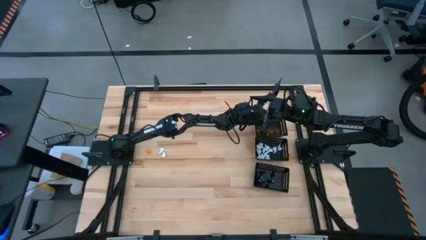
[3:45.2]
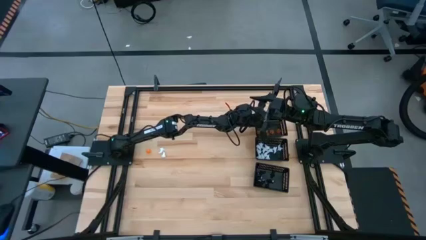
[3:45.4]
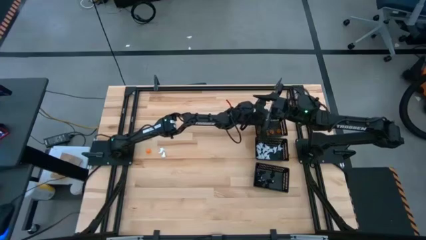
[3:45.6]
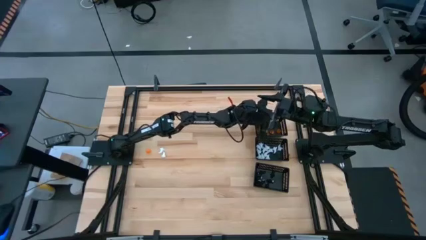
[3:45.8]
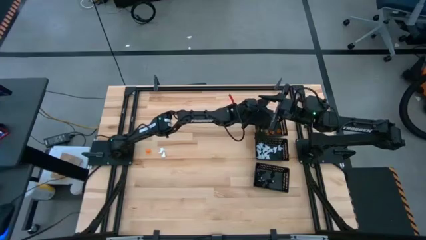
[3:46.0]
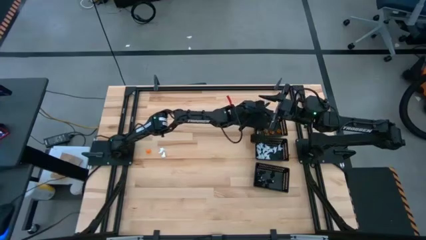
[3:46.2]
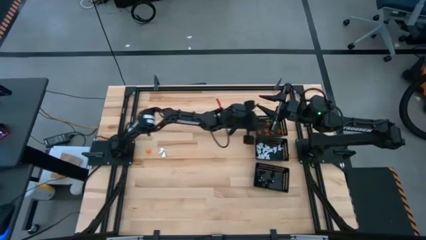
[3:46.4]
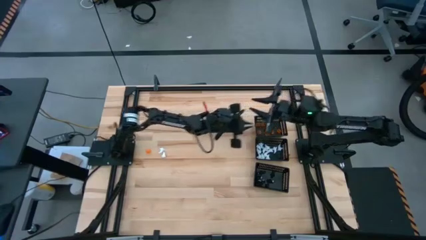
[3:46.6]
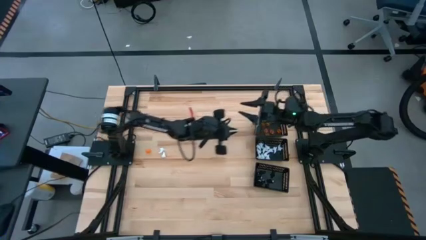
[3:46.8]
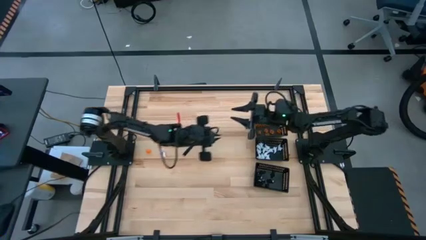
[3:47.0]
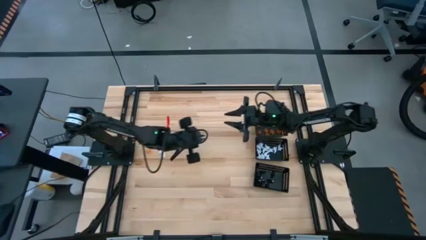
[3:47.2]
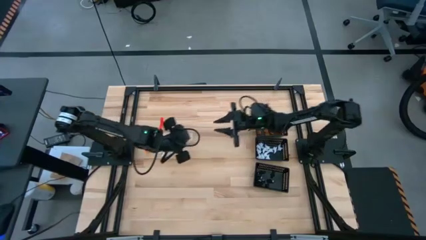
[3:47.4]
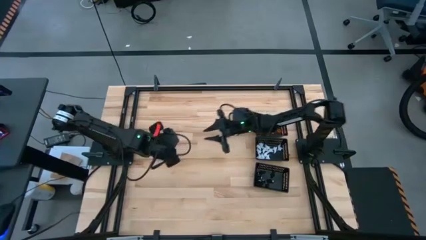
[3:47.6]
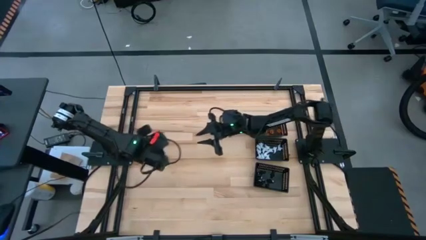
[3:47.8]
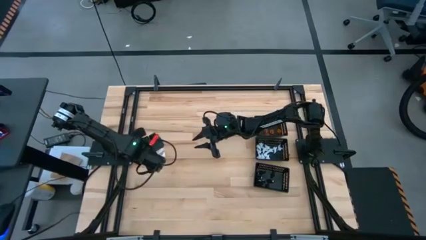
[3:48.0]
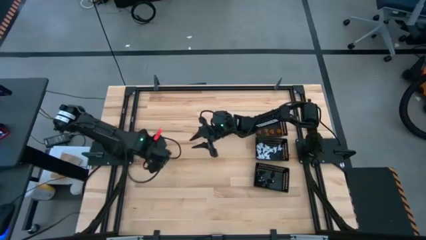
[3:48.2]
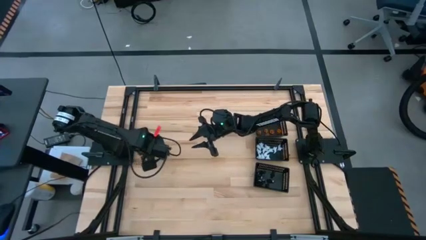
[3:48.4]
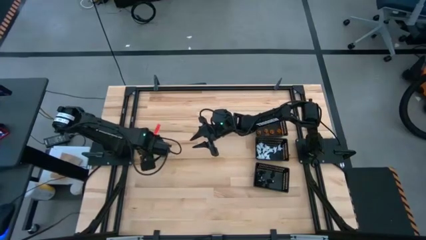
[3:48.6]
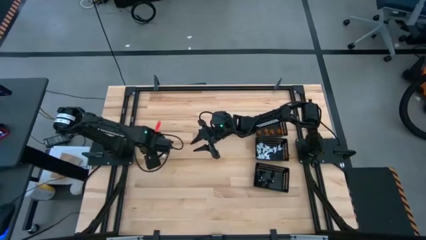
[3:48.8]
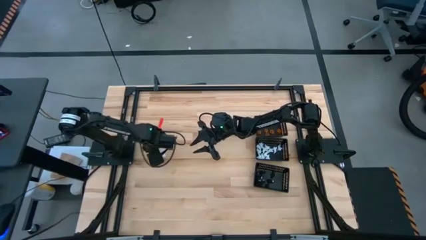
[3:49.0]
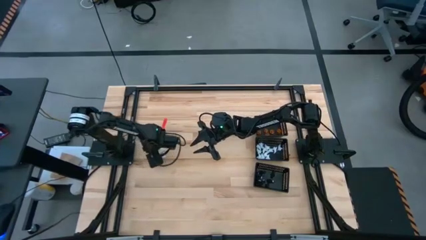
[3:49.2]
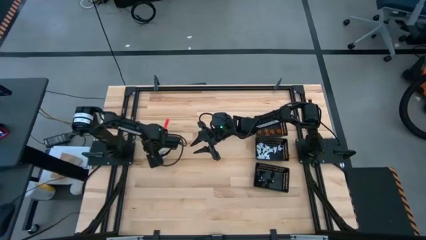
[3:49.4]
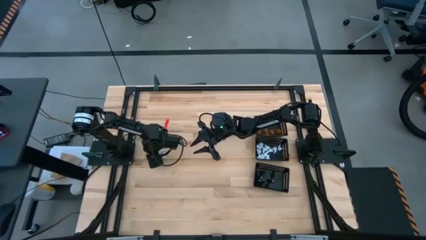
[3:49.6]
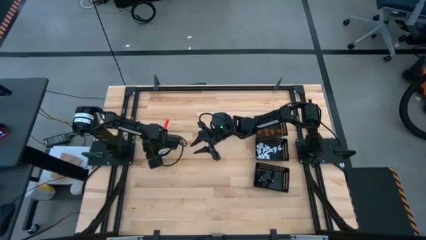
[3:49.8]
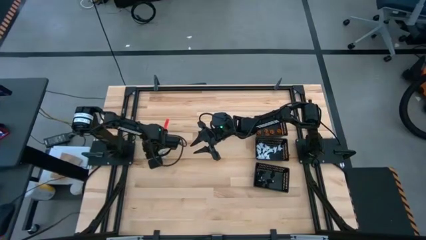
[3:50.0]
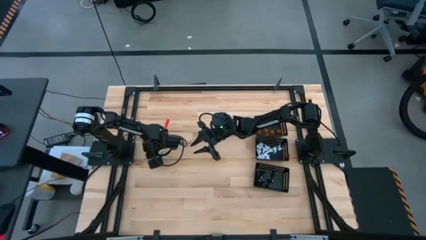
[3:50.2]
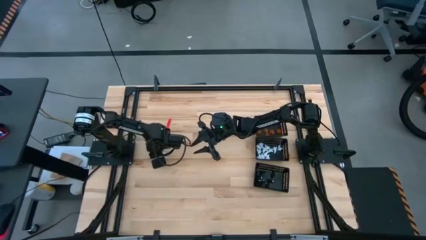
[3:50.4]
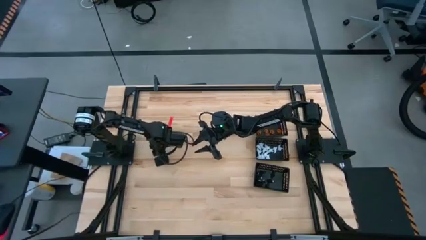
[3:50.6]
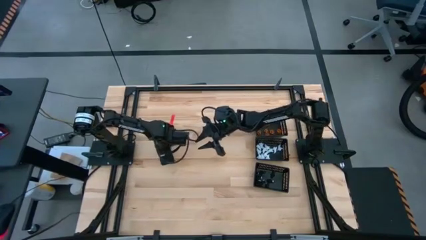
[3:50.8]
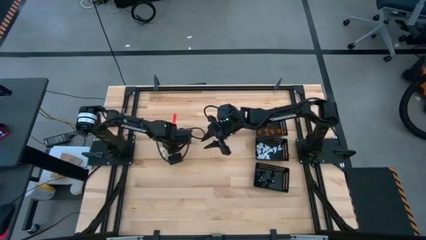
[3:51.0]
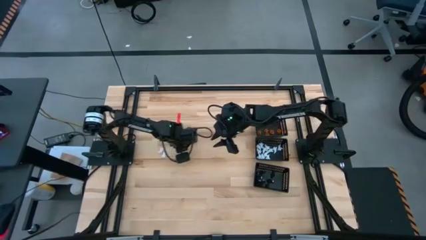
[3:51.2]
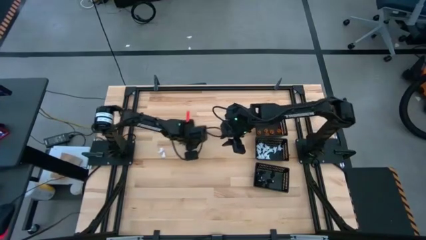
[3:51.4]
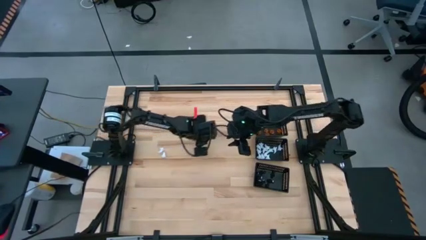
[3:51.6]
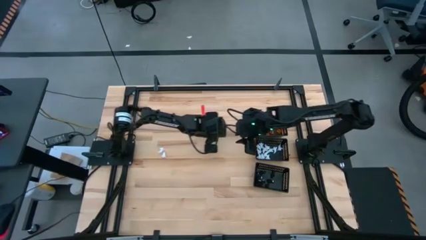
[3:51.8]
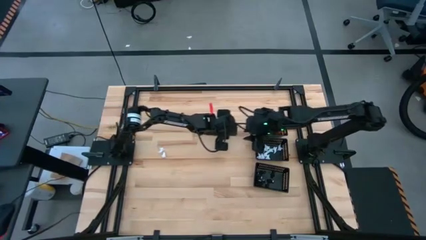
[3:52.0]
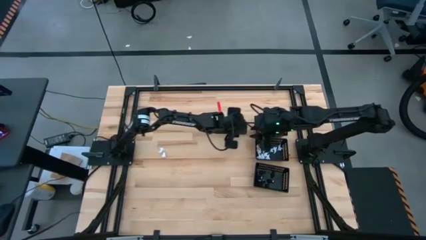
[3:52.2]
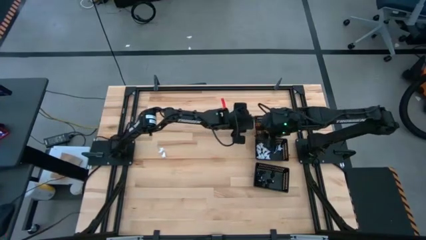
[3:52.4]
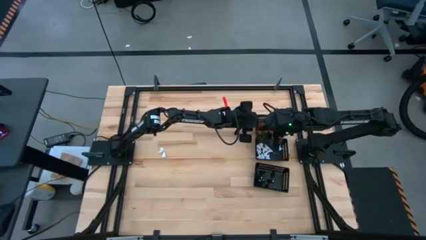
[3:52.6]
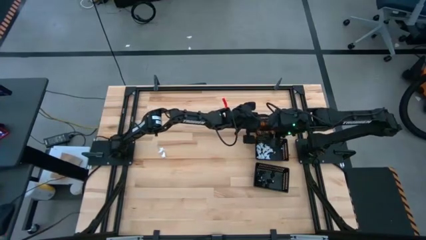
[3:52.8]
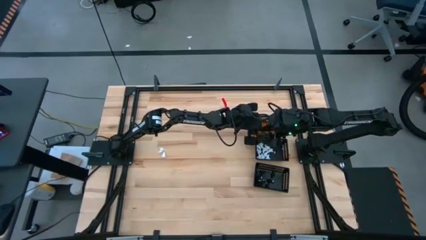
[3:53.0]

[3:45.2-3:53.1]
Task: Sort Halloween decoration
Put the orange pumpkin toy into the top black bin

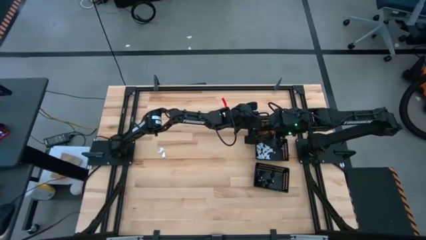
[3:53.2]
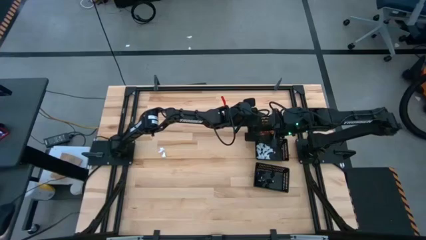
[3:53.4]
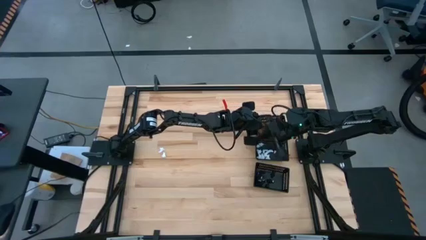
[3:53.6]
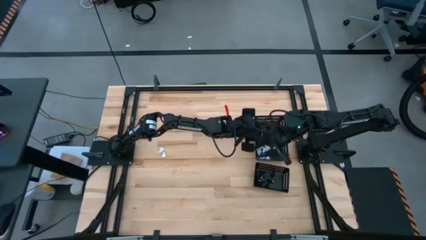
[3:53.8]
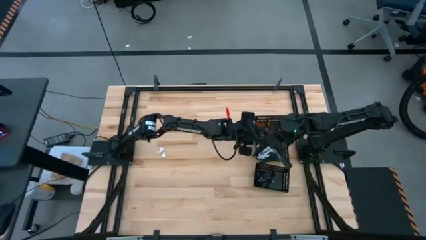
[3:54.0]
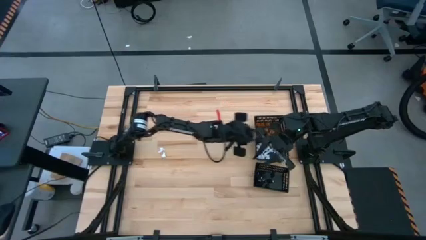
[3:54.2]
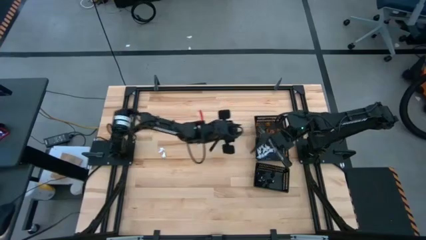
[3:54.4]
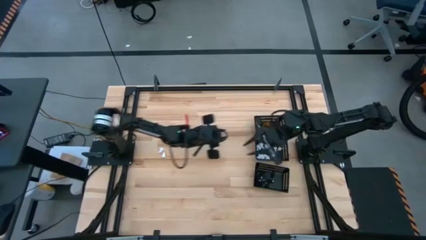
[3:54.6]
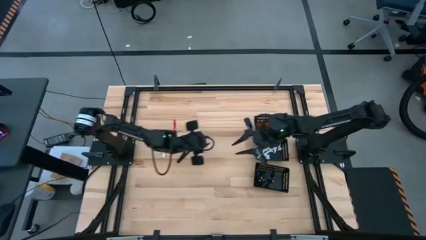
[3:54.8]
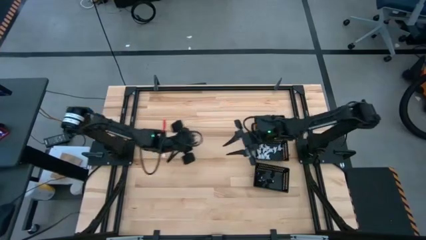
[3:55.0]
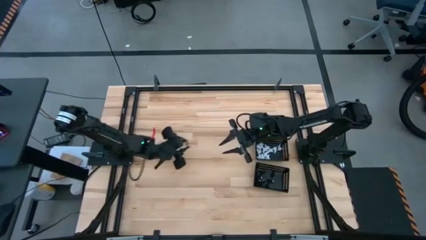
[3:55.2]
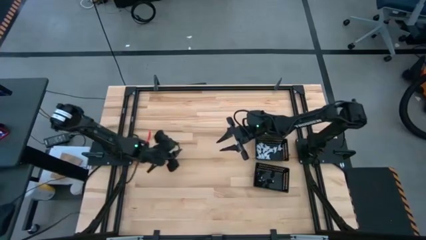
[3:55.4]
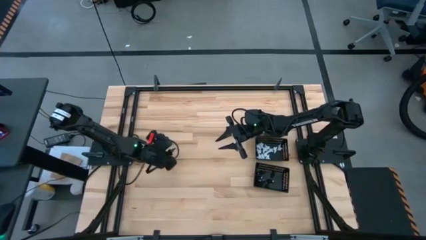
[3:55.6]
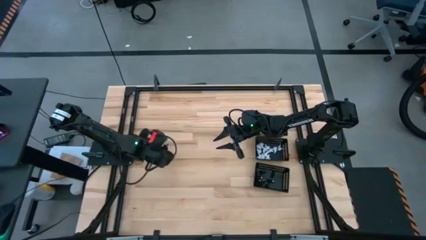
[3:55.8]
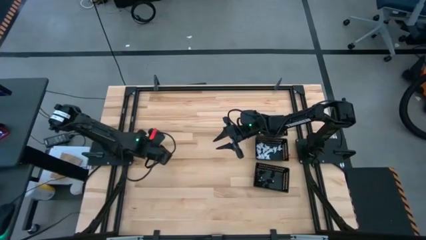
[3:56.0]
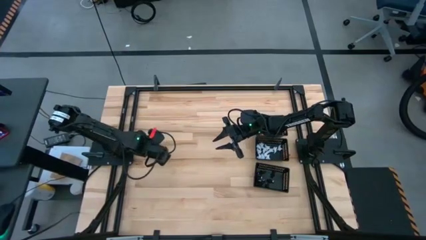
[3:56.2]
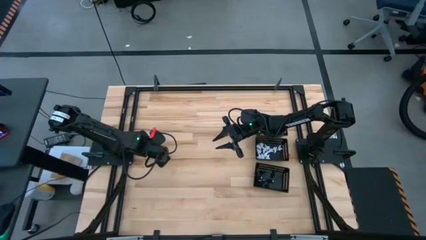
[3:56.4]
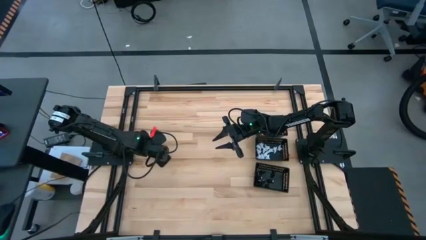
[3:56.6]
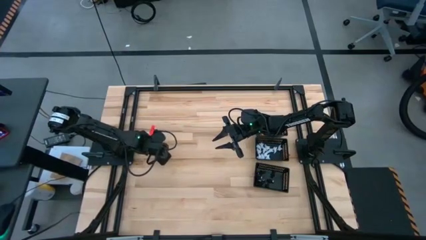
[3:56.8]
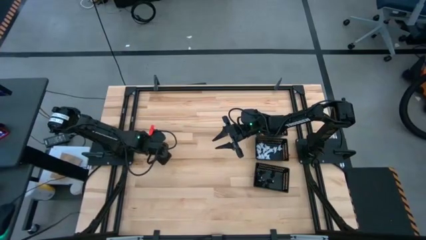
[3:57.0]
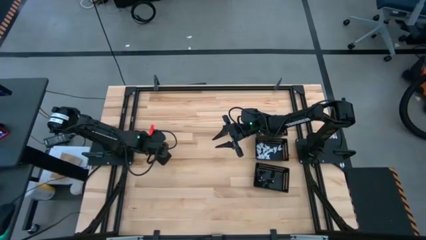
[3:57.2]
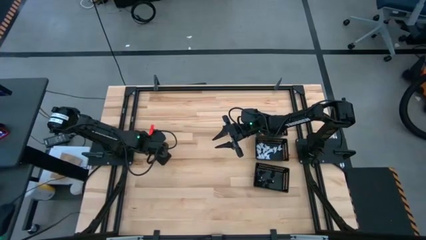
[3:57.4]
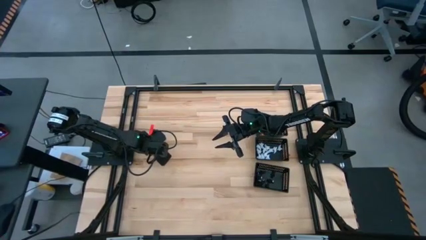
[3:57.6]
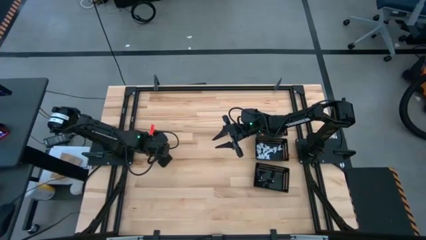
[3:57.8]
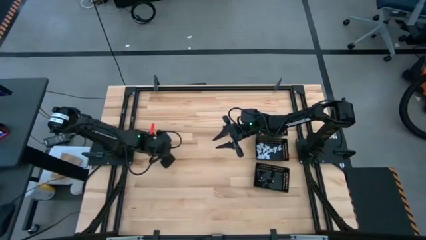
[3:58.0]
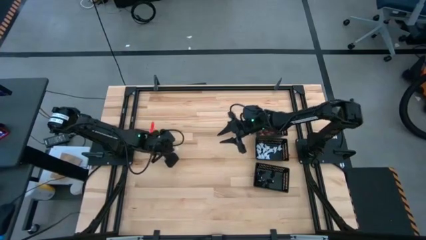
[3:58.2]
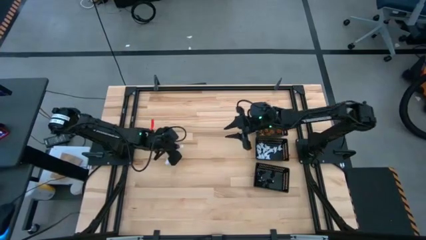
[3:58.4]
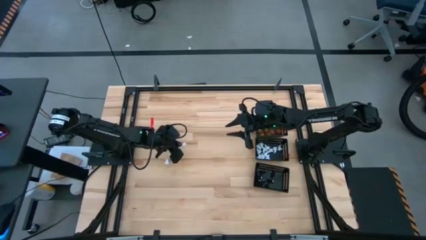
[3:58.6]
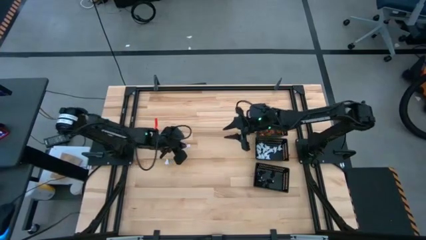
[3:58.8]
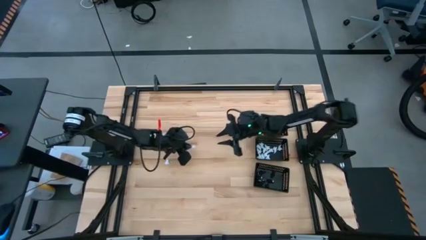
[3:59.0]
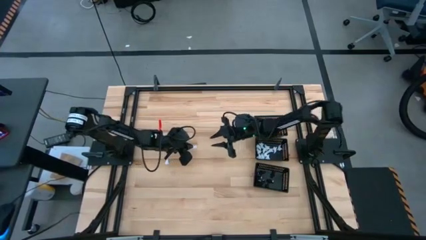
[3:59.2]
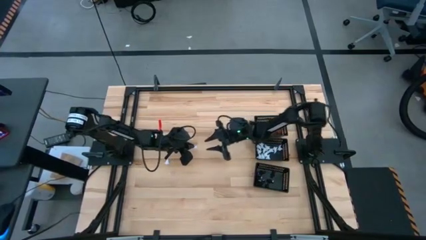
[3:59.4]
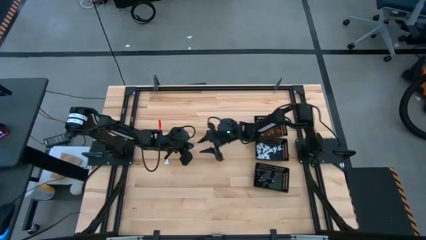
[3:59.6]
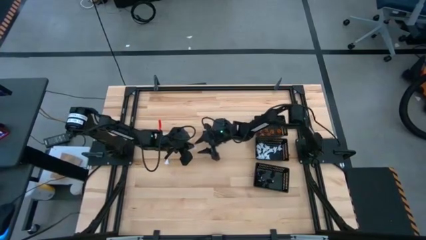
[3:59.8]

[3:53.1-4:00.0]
Put the white ghost toy into the center bin

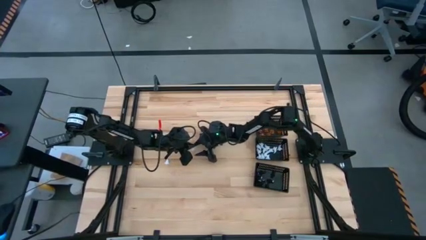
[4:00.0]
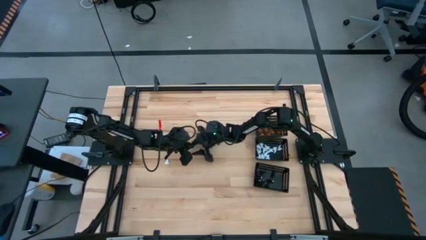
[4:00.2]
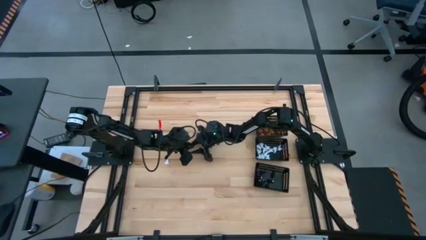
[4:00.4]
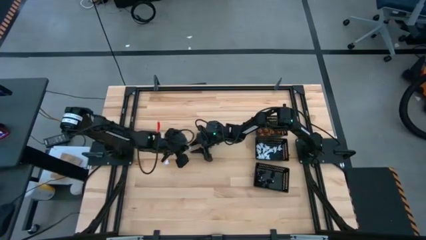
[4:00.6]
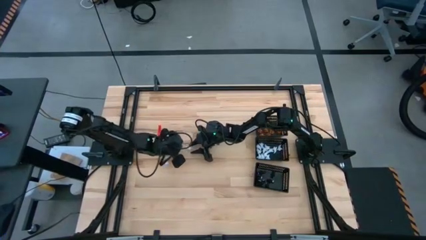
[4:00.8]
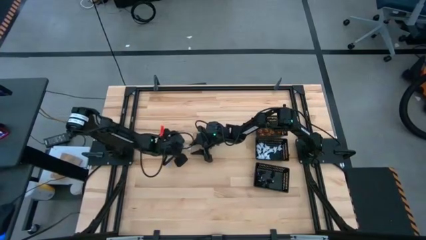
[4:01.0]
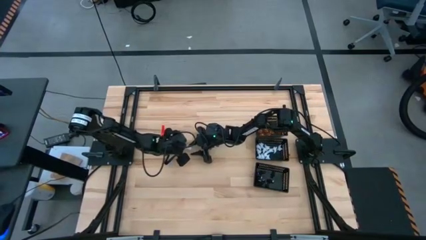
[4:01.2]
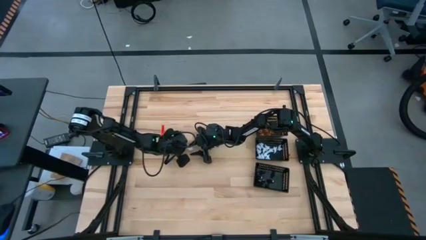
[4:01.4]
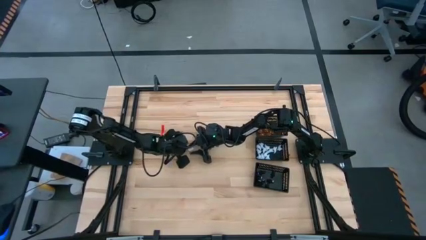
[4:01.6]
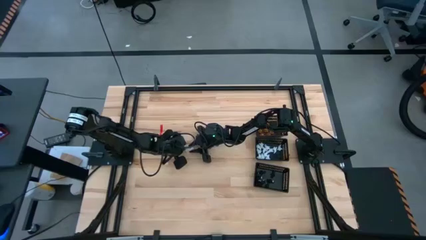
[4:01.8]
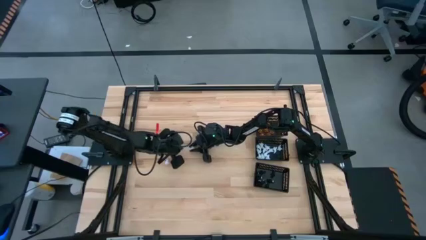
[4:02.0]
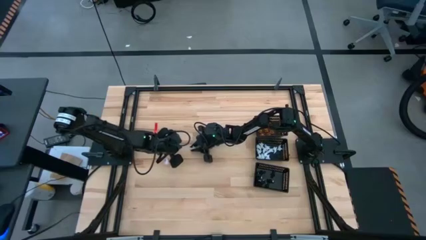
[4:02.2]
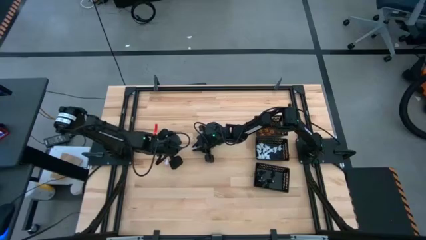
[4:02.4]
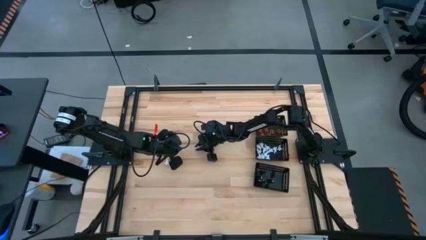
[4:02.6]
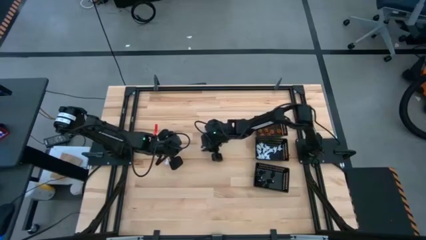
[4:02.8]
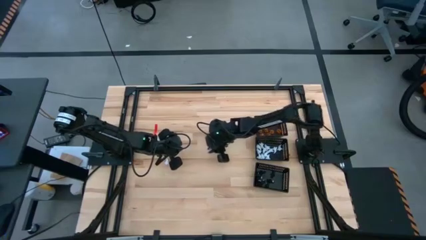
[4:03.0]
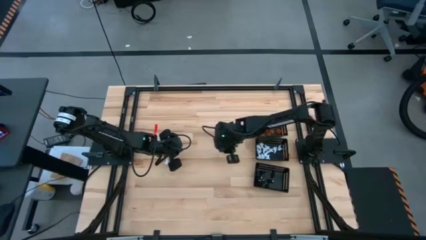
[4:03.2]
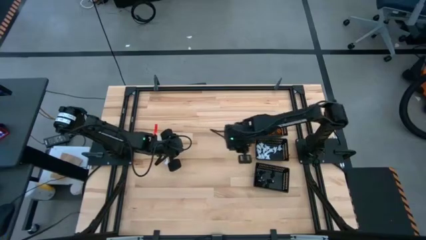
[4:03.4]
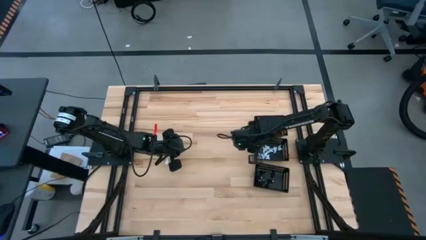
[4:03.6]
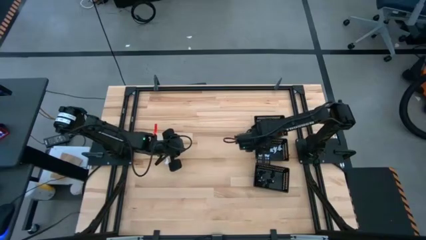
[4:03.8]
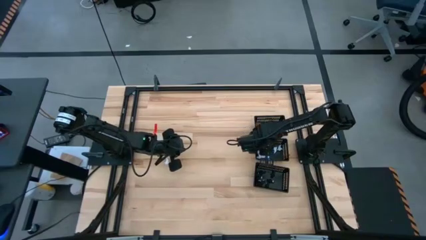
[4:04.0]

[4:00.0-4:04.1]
Put the white ghost toy into the center black bin
